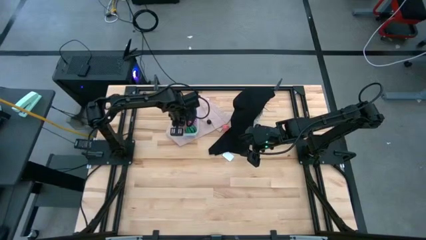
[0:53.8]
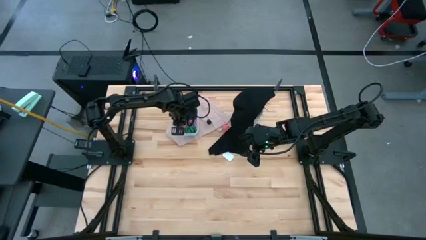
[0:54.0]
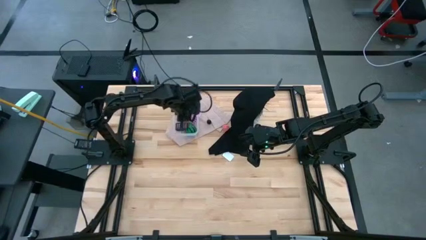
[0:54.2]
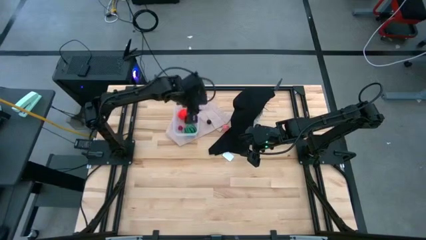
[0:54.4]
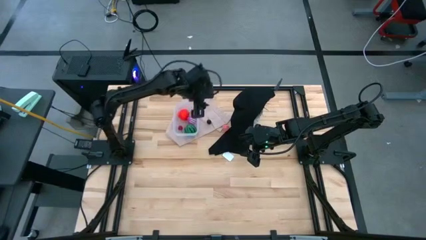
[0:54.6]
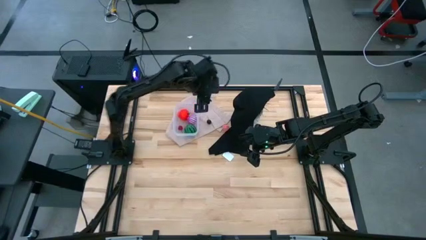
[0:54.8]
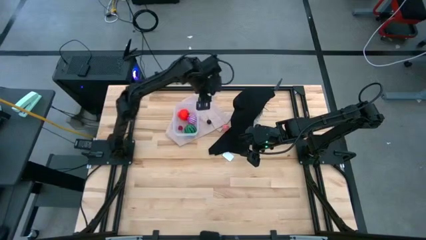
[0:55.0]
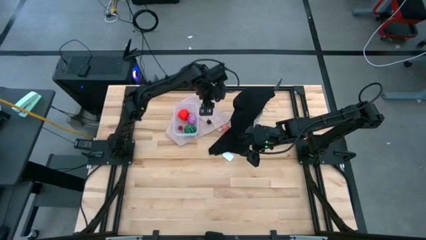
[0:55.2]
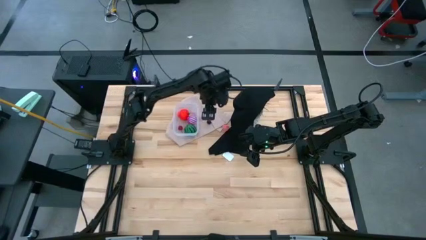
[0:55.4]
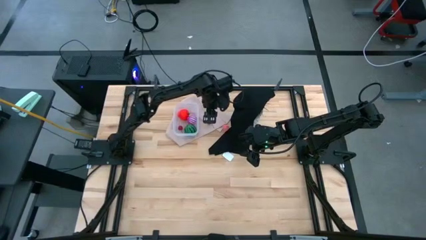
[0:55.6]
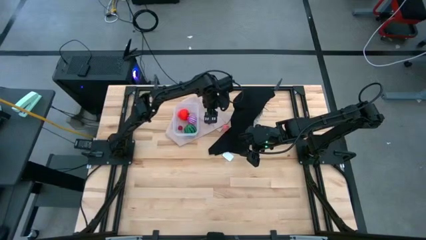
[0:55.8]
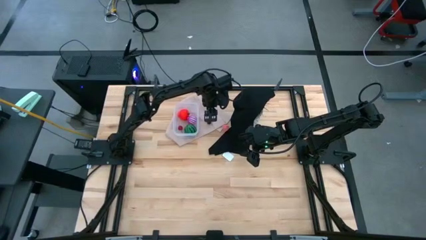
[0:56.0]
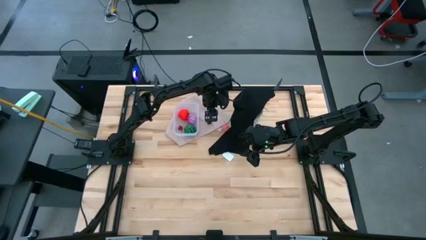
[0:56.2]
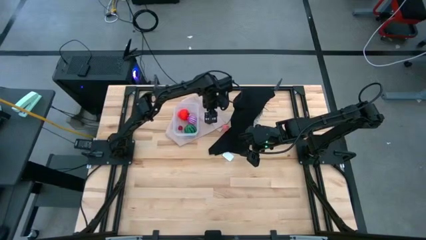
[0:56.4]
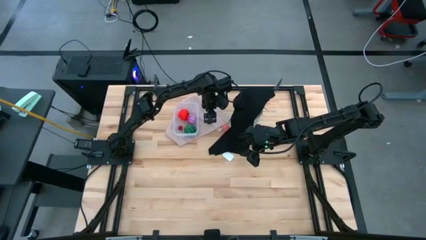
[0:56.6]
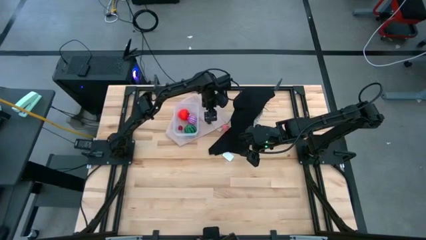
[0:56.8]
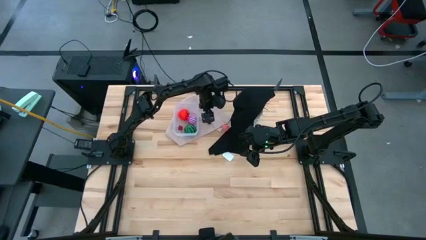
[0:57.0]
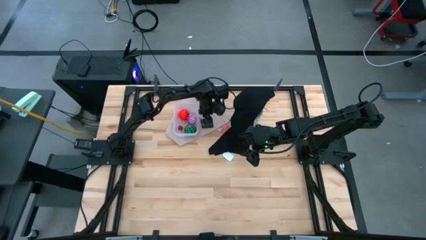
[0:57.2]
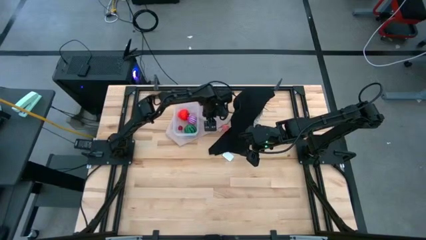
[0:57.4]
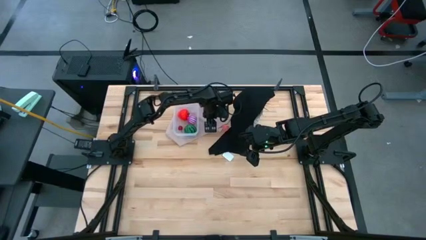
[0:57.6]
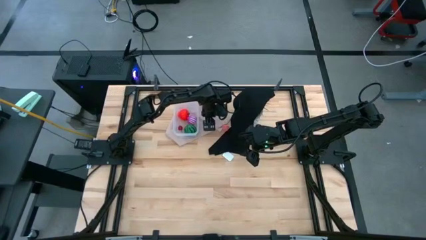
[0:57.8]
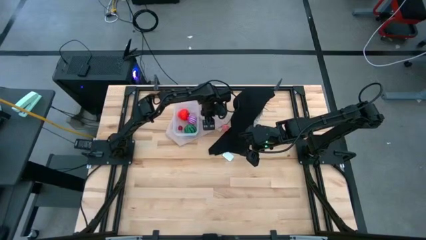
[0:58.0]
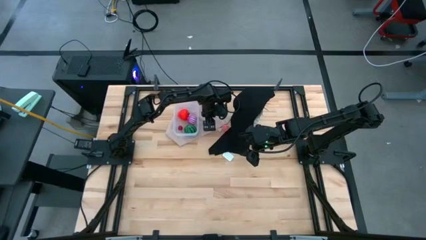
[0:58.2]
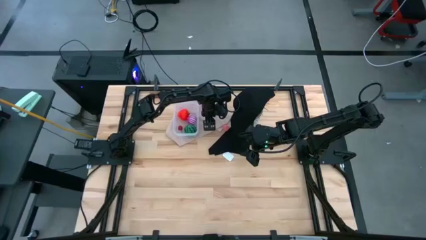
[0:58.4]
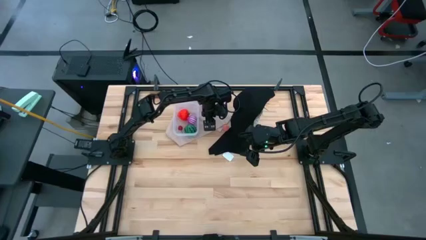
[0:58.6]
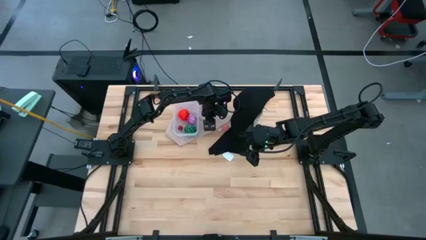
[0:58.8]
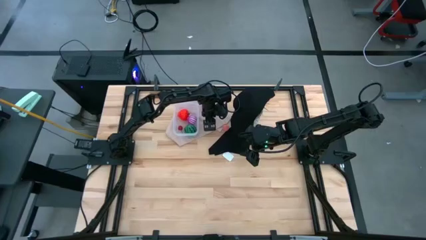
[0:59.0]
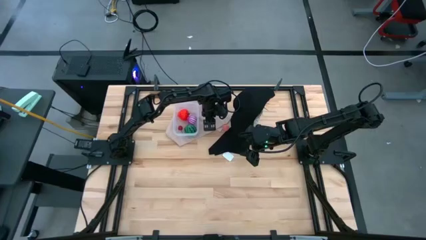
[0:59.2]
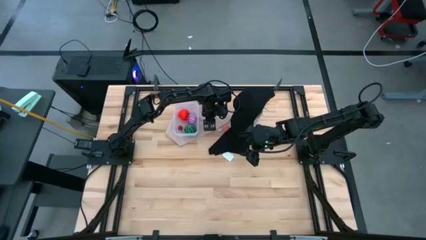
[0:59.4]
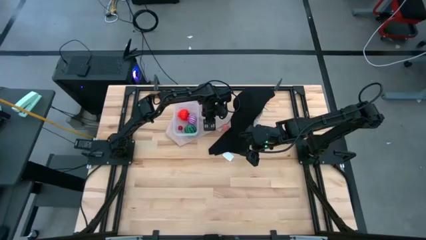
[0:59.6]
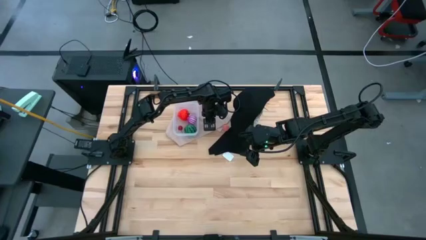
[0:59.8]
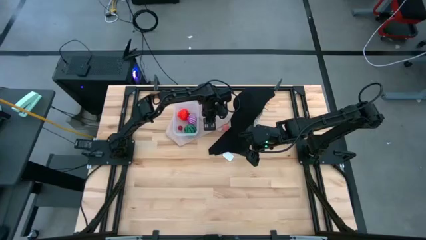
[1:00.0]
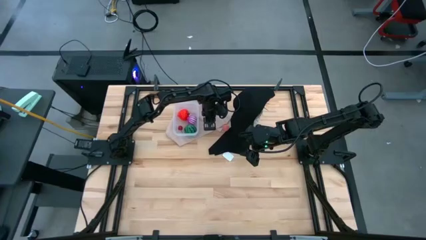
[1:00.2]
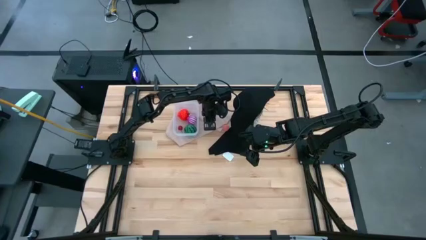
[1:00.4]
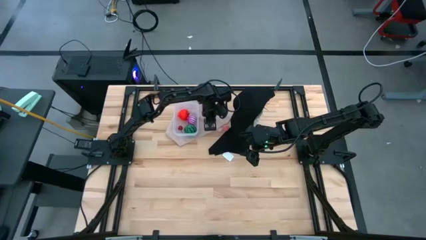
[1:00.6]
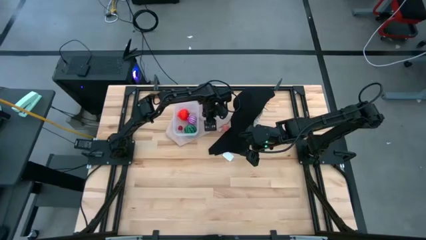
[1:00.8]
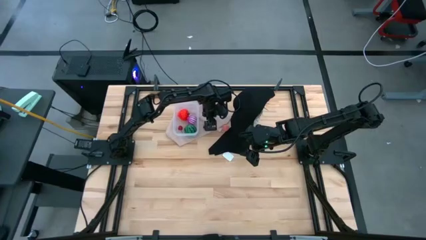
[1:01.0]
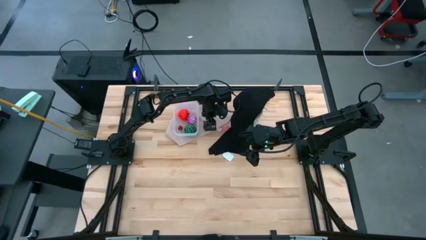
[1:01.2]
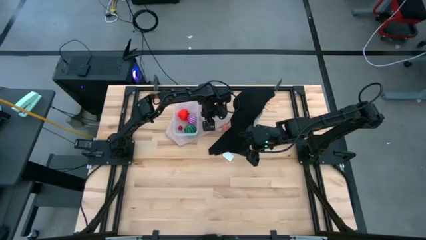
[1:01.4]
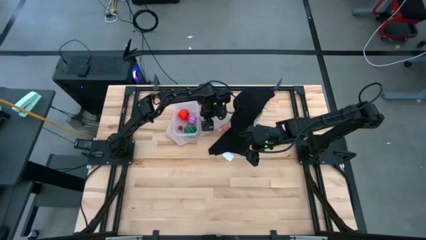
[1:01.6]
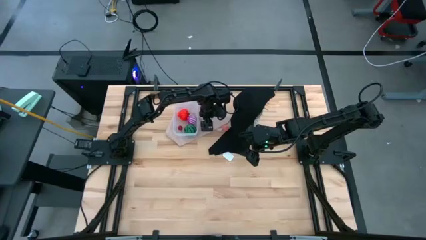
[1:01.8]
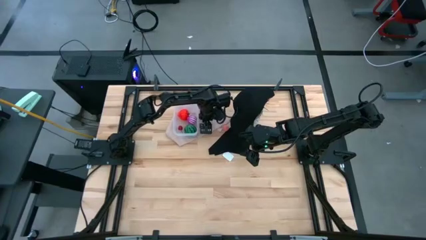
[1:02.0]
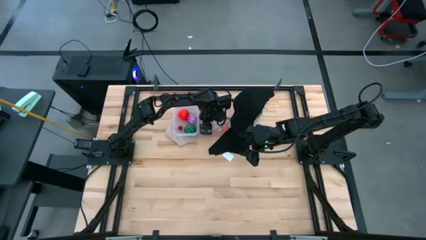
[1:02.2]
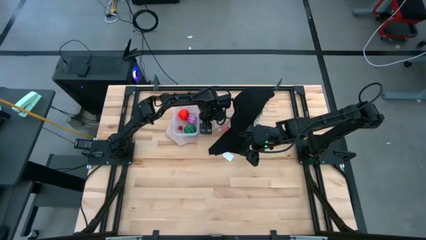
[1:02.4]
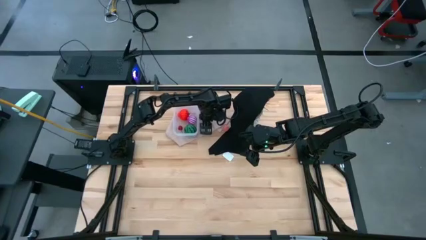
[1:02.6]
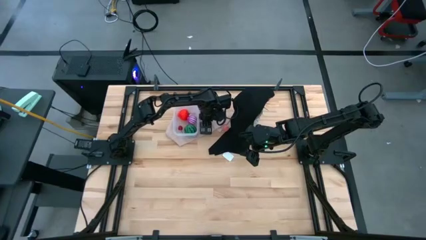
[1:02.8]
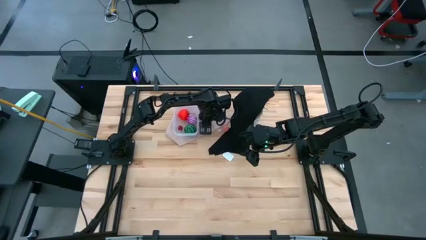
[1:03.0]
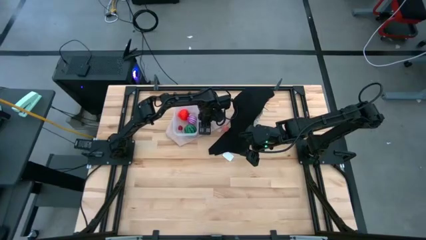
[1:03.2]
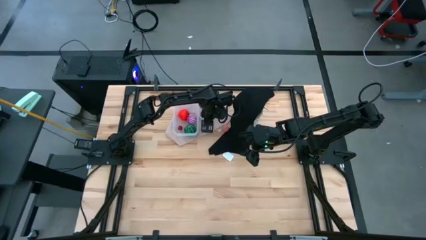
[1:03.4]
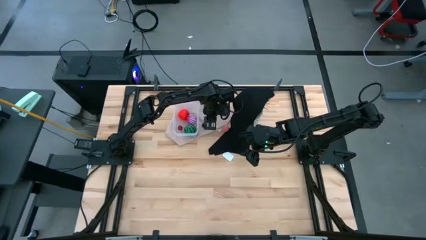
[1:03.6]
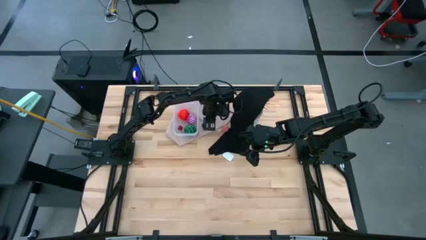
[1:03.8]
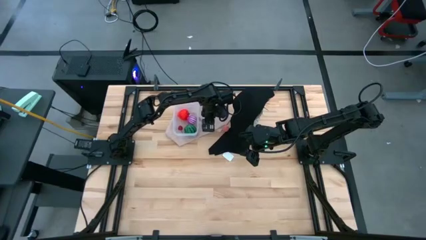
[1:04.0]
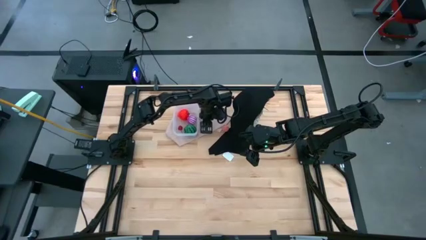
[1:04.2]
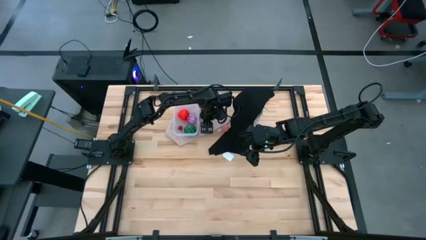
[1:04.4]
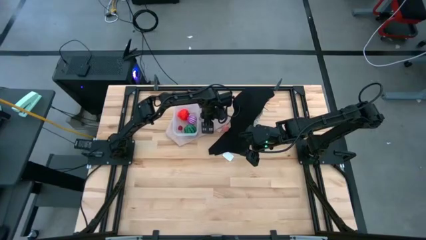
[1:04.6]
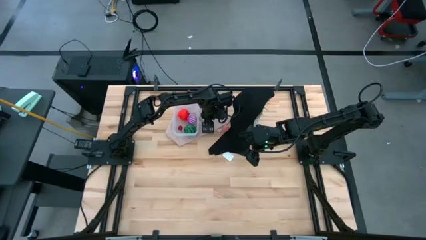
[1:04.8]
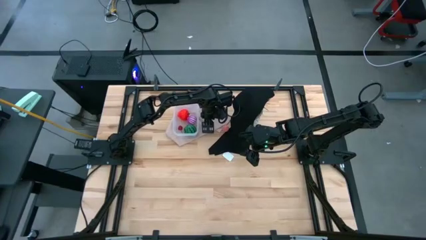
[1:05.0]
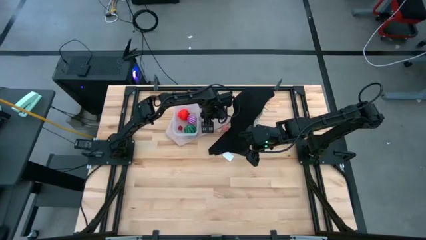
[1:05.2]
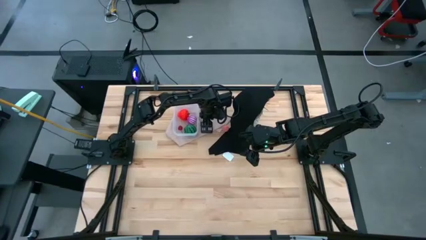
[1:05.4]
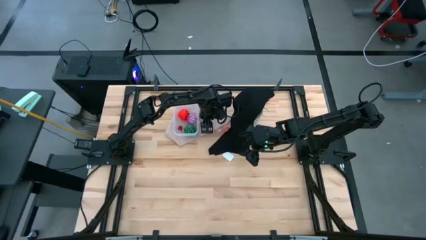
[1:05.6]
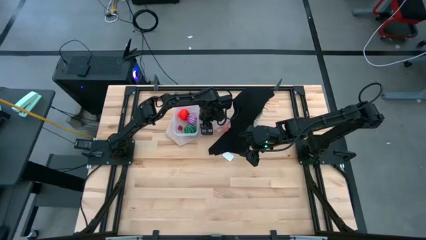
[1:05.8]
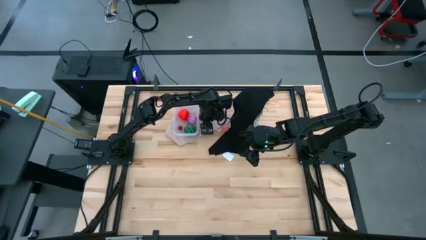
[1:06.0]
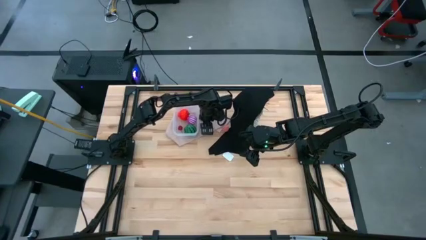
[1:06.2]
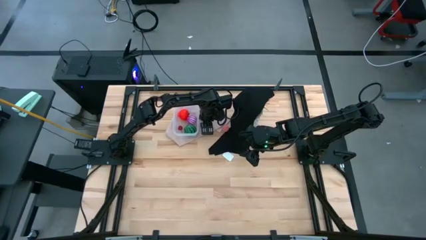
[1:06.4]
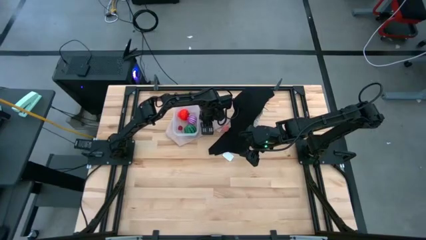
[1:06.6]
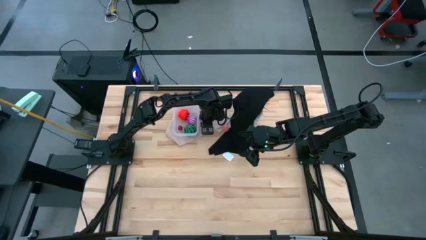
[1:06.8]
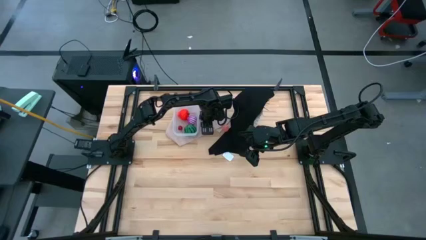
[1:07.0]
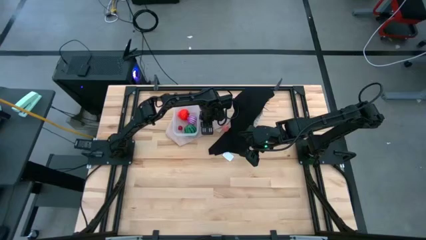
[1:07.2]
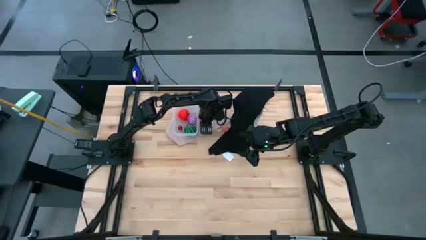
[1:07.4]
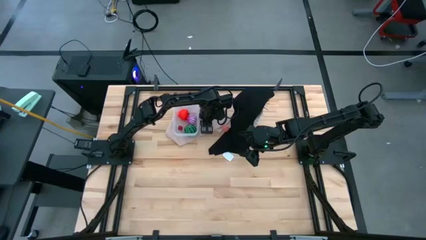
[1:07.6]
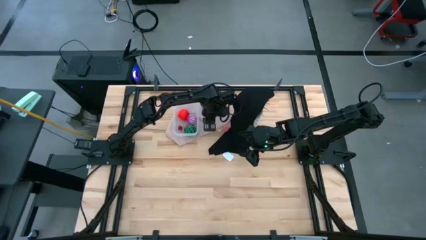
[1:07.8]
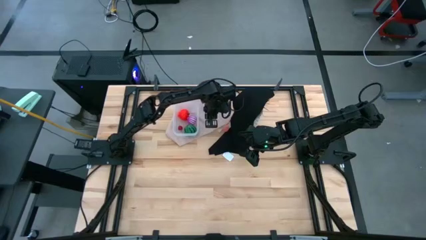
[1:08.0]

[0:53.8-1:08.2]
Task: Pick and placing Produce into tupperware
Put the black cherry into the transparent bin
